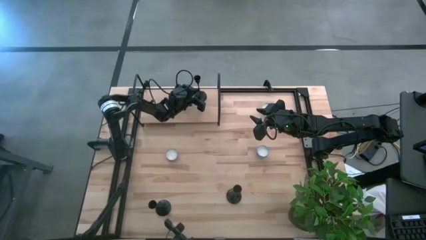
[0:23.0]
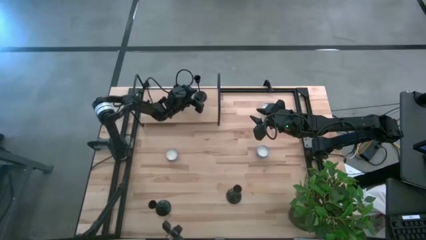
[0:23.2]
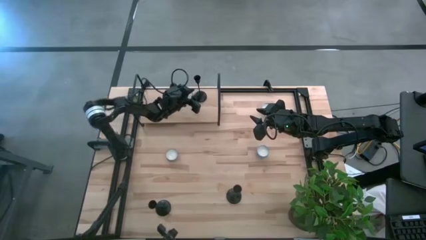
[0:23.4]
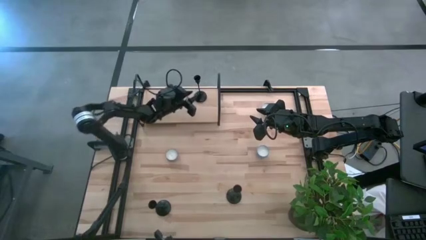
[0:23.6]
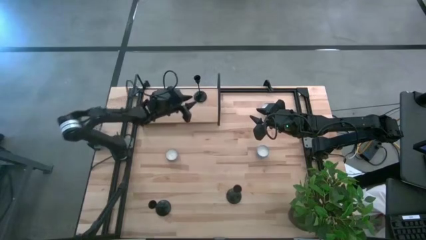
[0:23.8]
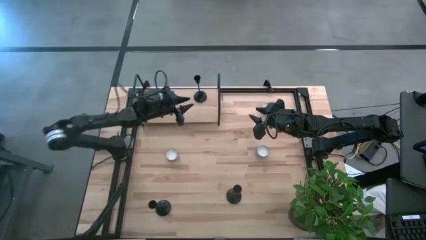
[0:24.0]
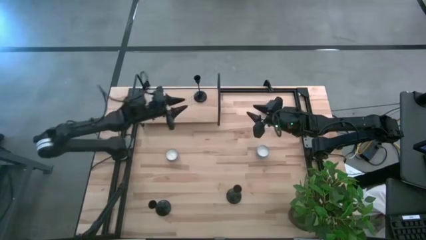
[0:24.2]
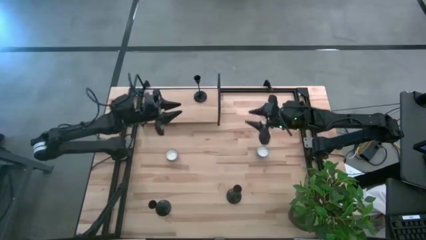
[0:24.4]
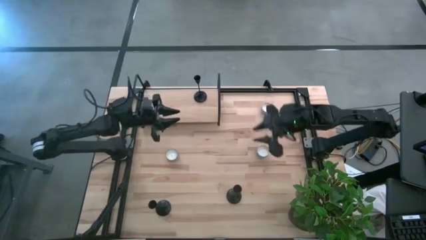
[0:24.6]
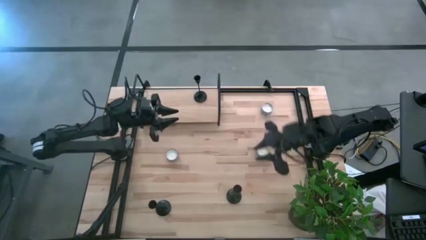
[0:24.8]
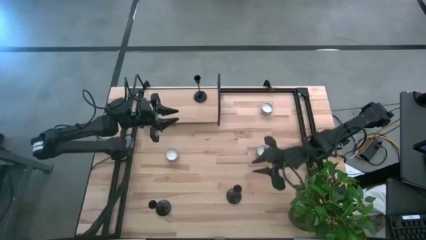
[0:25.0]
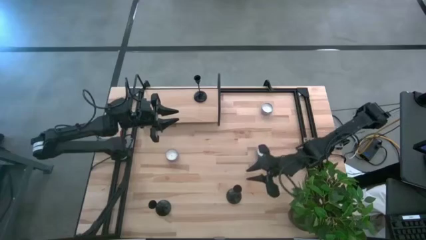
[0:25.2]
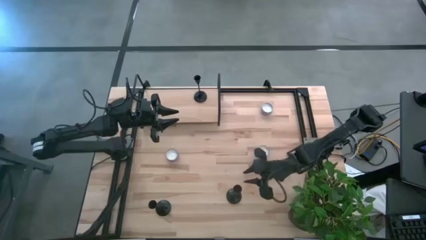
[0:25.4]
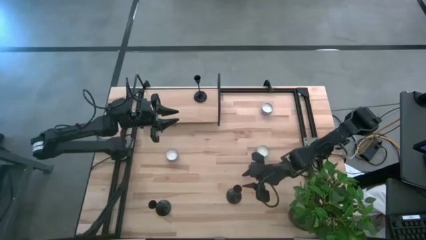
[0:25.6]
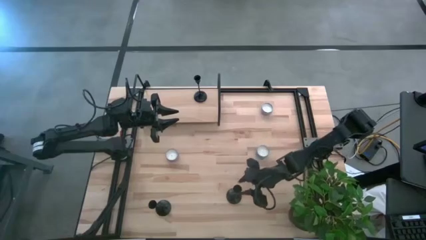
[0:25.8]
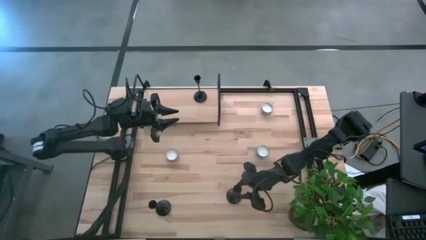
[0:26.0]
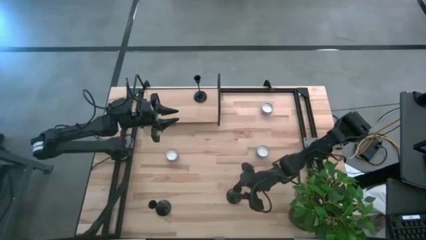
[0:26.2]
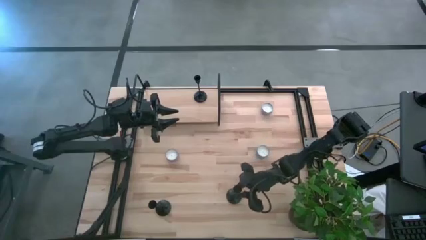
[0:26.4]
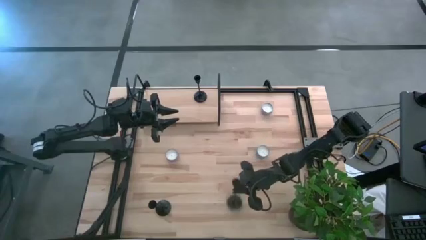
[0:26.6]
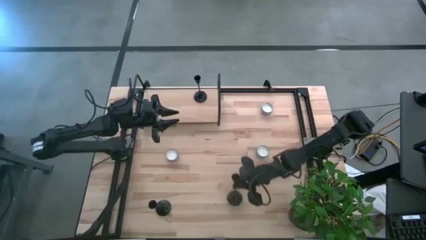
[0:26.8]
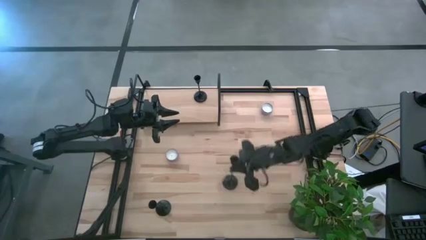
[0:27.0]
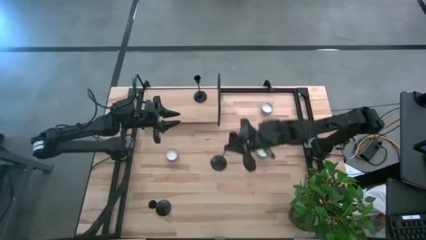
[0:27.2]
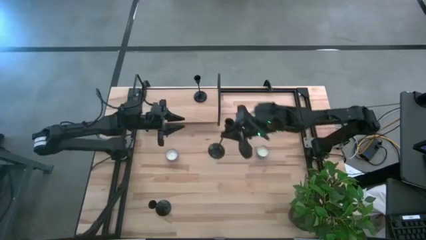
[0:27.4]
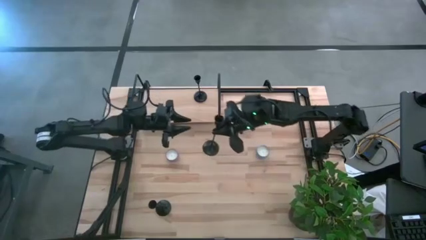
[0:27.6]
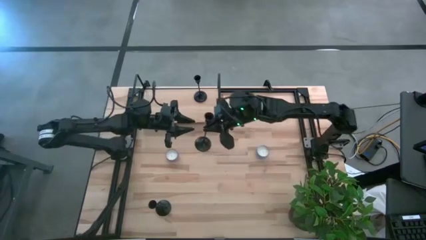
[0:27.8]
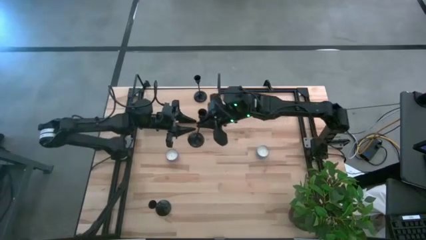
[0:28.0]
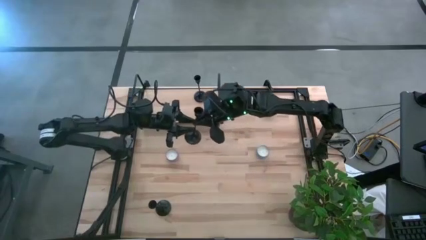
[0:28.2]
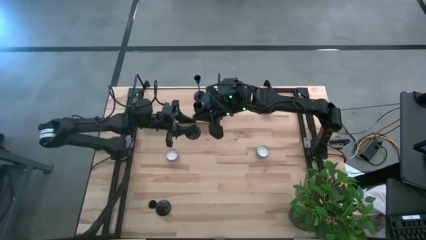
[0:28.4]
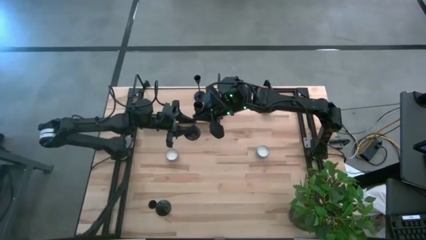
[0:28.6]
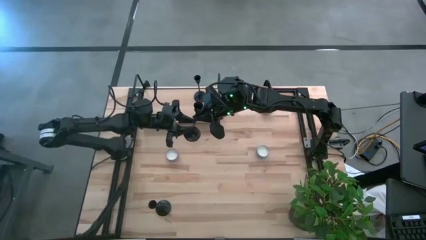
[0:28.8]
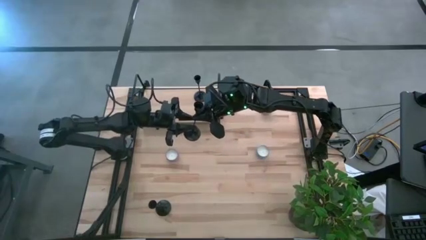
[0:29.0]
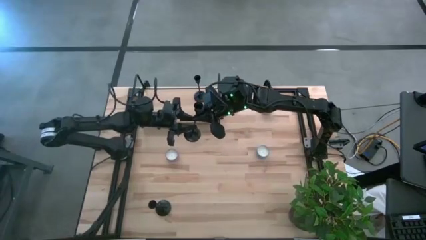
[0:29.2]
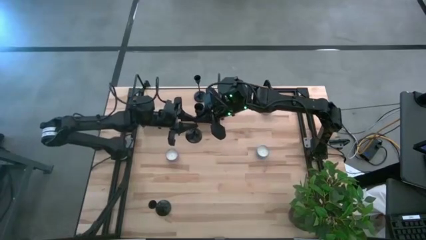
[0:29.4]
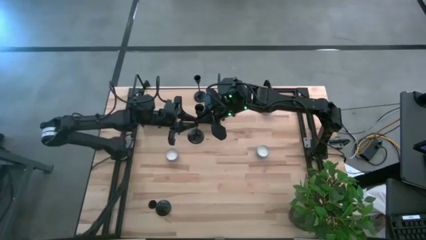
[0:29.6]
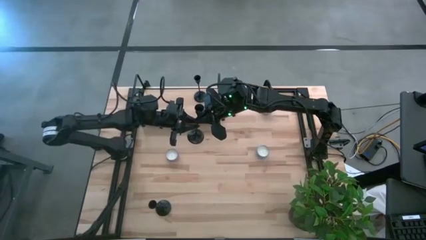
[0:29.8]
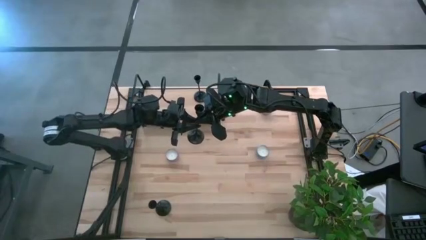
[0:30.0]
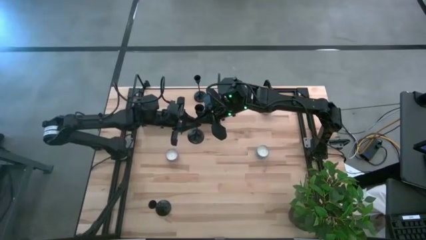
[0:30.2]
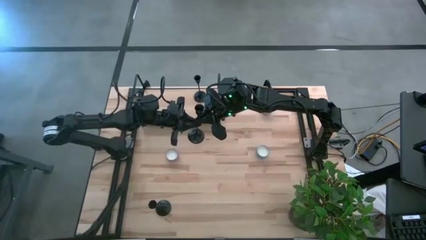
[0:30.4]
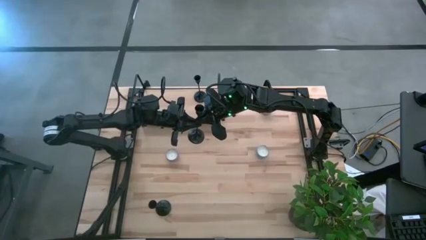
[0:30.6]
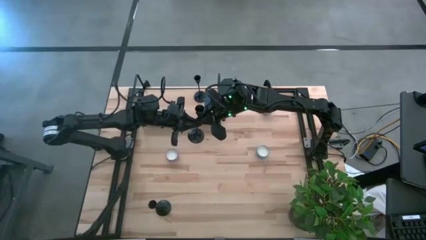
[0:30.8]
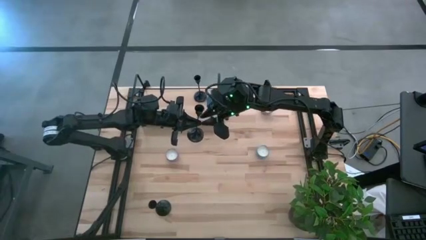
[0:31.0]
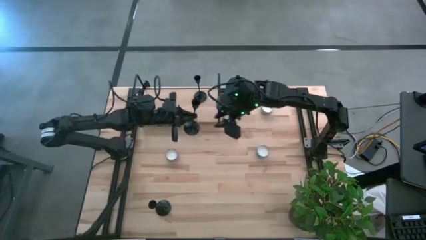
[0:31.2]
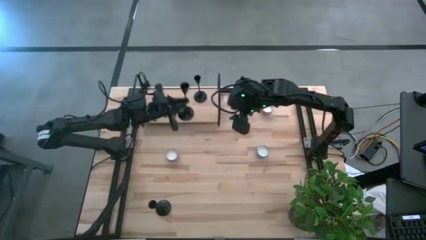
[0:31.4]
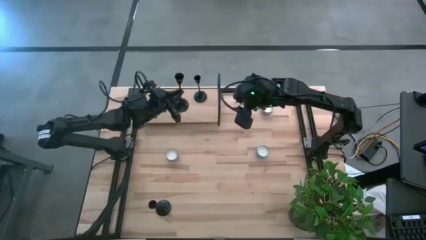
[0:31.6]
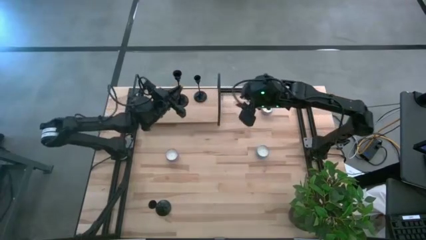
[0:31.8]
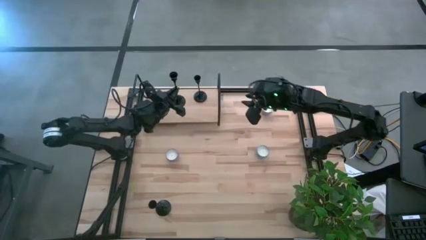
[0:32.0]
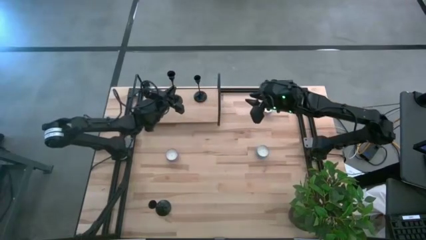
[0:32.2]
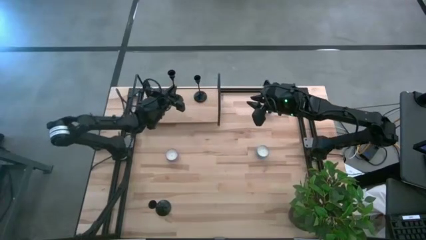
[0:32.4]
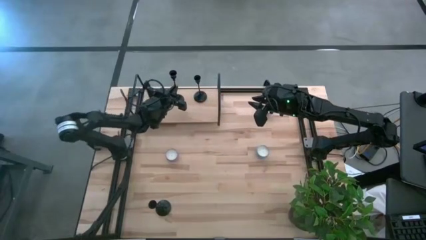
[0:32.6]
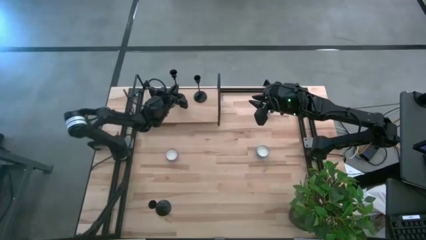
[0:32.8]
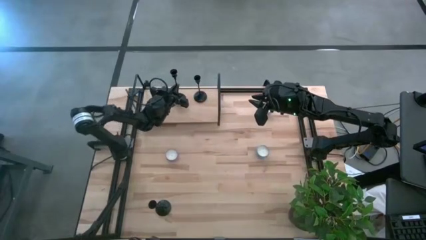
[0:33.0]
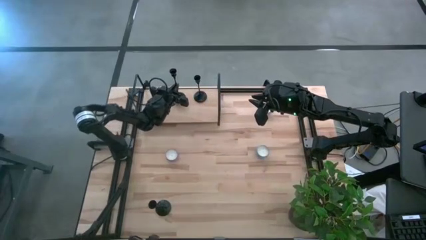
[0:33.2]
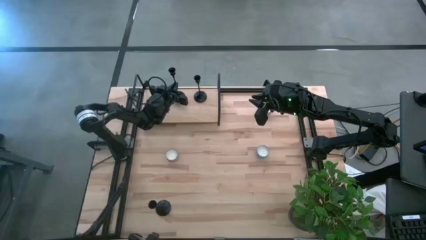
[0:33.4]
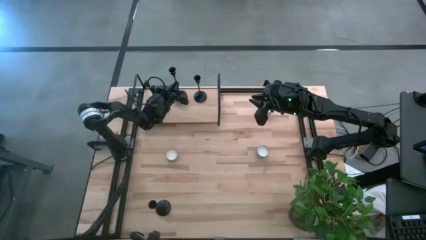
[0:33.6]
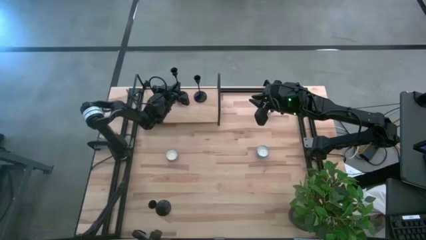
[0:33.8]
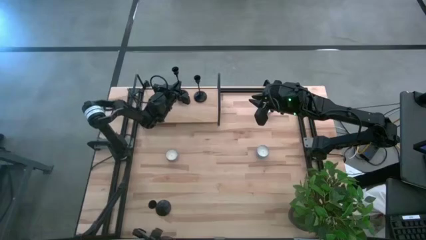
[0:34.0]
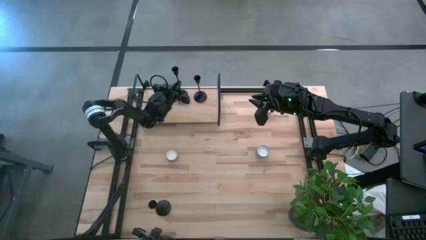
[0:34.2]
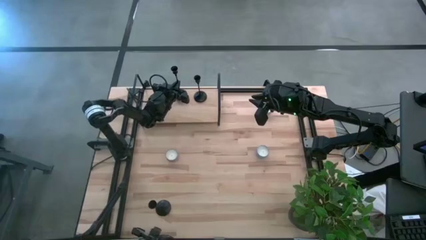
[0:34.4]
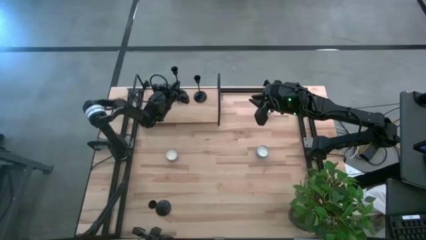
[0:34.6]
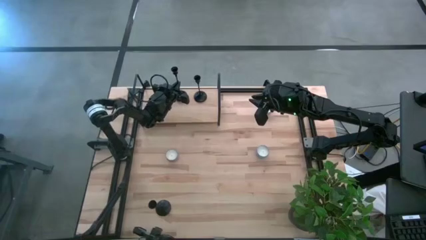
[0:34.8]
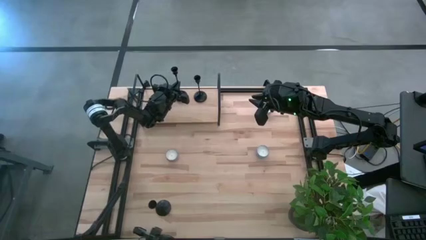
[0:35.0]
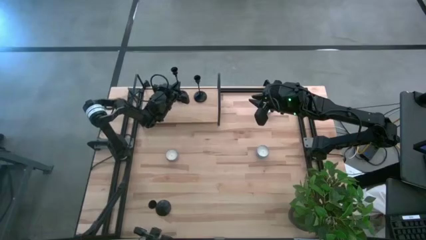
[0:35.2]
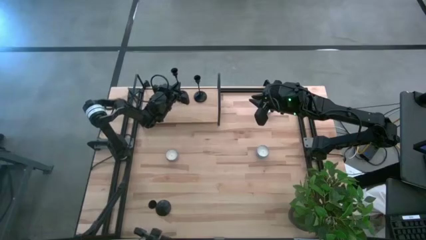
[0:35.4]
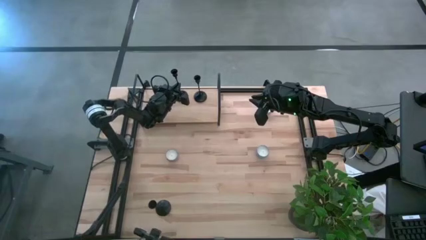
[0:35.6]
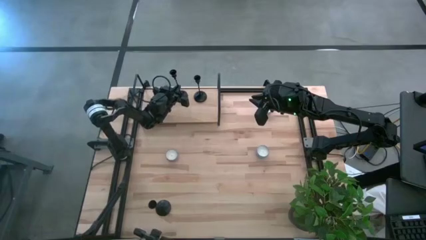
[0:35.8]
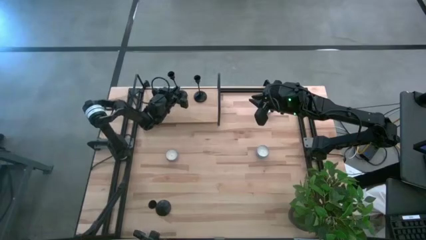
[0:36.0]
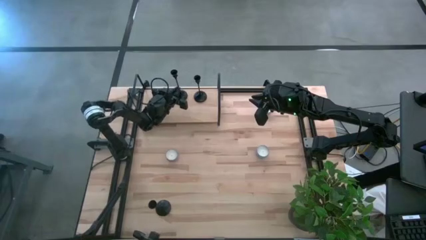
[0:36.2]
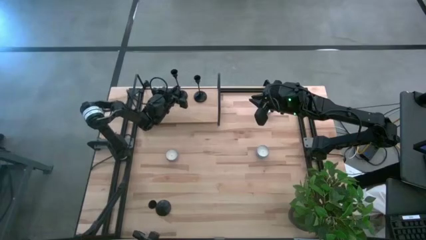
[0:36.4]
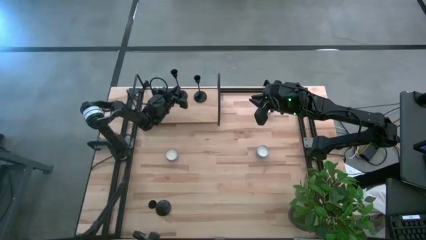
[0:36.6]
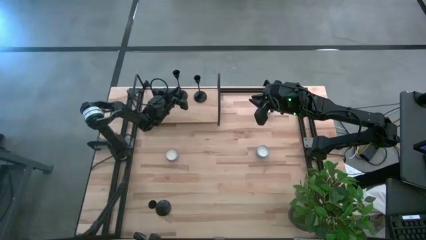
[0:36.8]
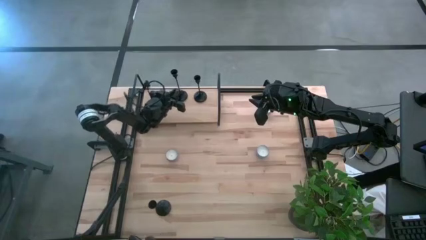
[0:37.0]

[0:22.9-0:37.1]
Task: Pick & Place candle stick holders
Align the right black candle holder with the black candle holder on the shelf
